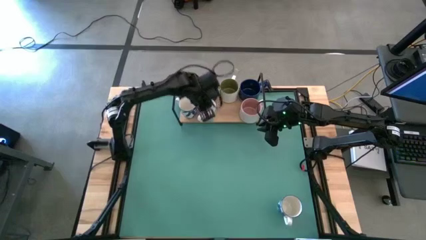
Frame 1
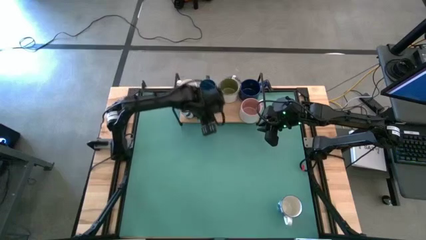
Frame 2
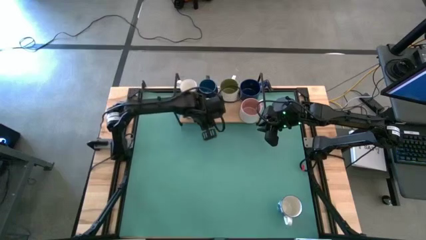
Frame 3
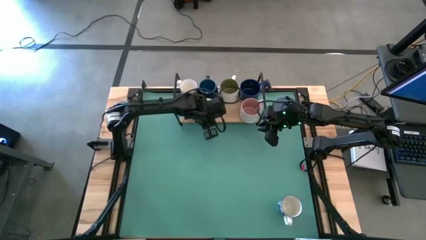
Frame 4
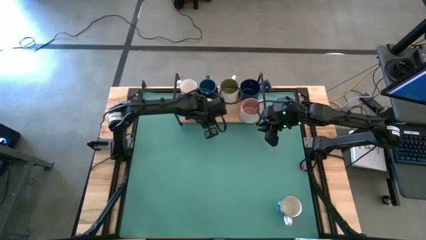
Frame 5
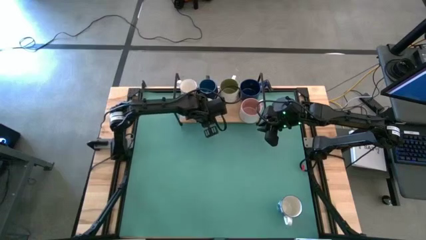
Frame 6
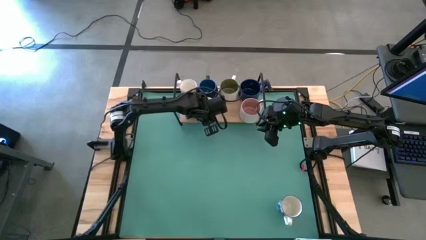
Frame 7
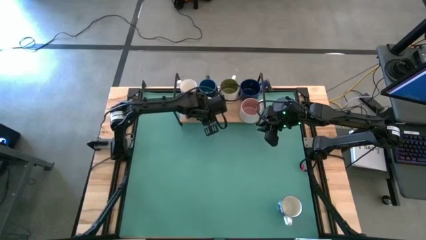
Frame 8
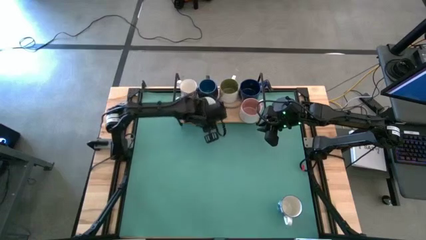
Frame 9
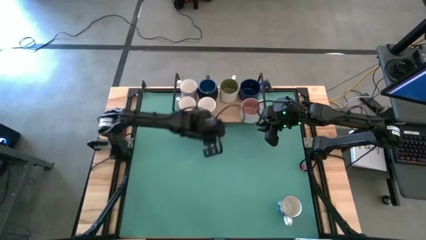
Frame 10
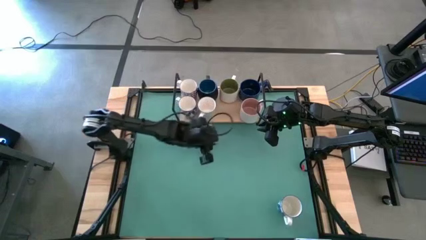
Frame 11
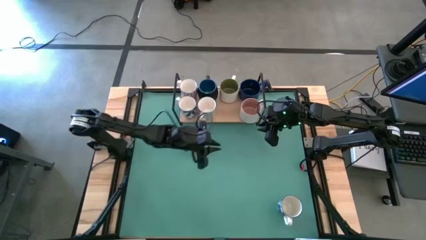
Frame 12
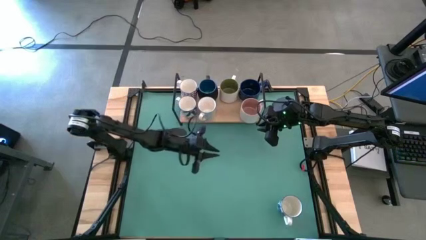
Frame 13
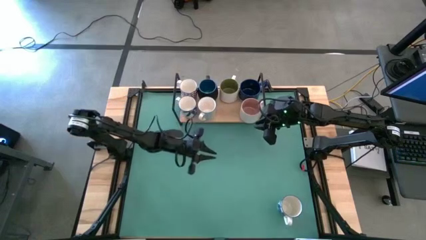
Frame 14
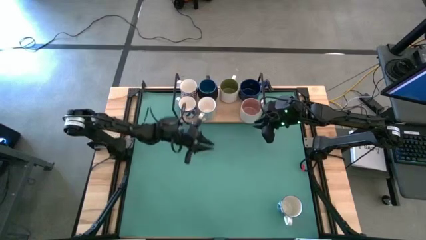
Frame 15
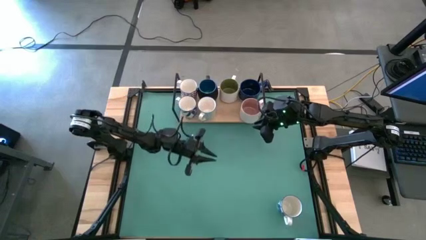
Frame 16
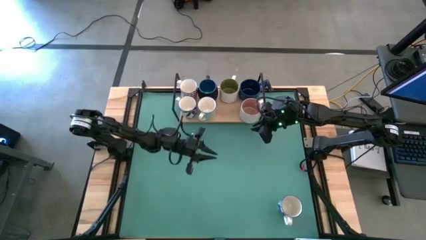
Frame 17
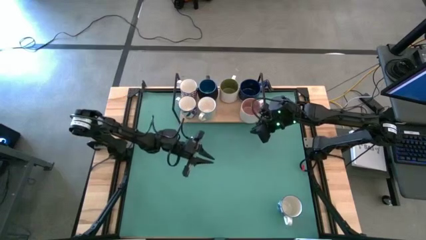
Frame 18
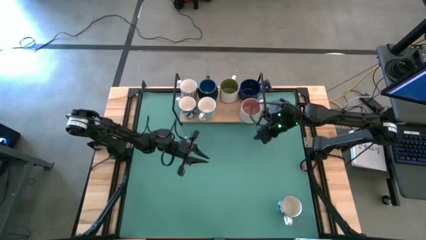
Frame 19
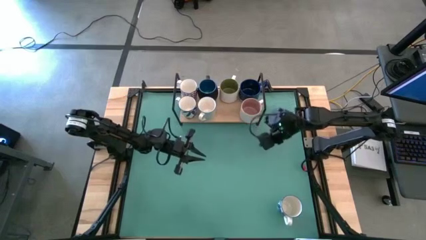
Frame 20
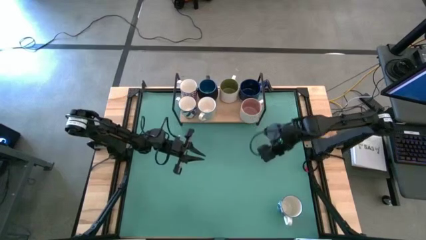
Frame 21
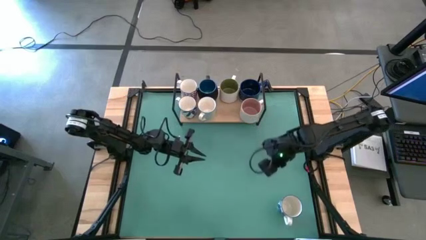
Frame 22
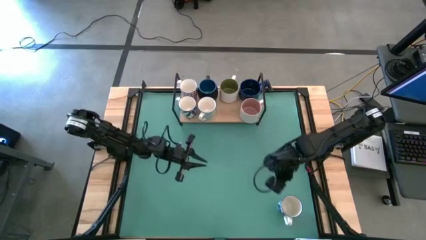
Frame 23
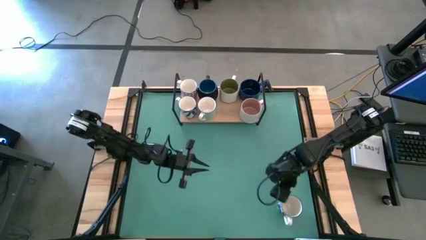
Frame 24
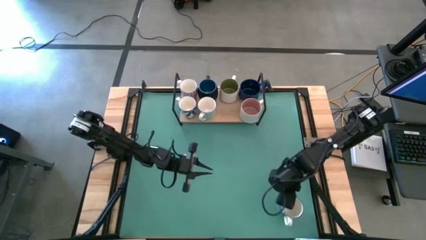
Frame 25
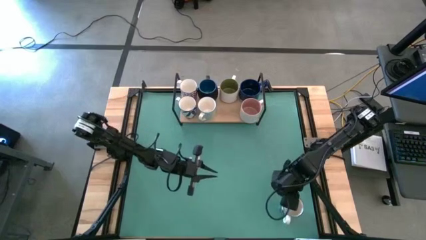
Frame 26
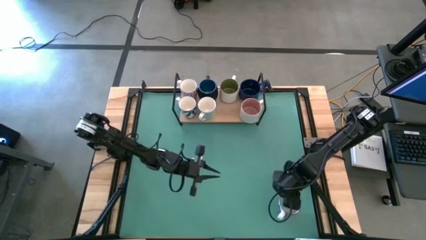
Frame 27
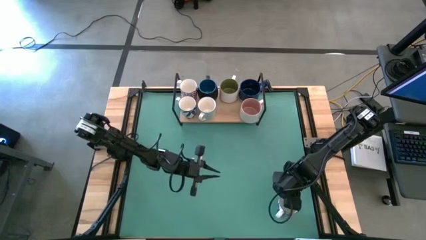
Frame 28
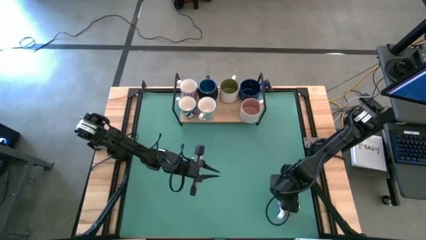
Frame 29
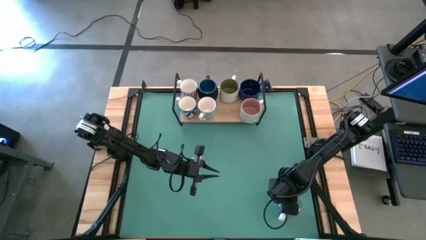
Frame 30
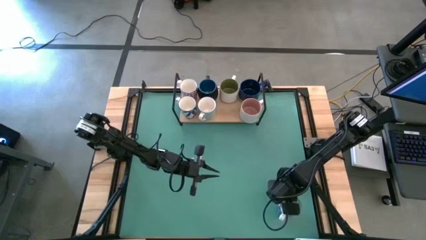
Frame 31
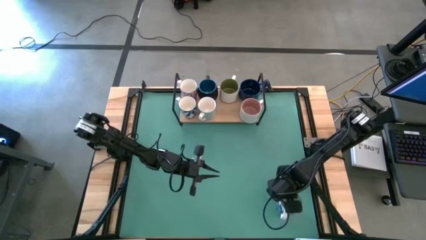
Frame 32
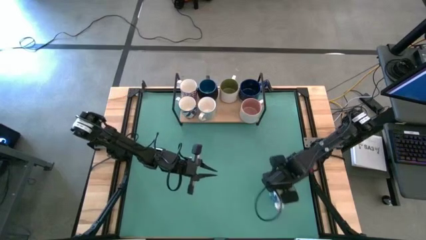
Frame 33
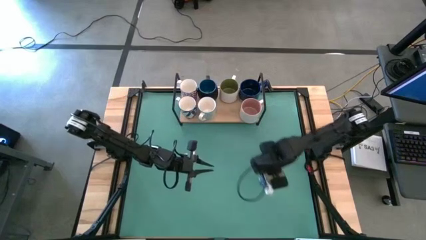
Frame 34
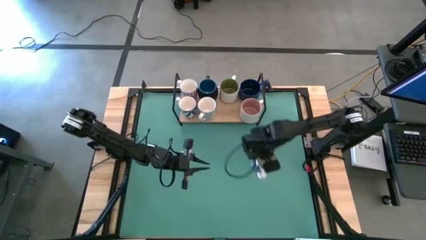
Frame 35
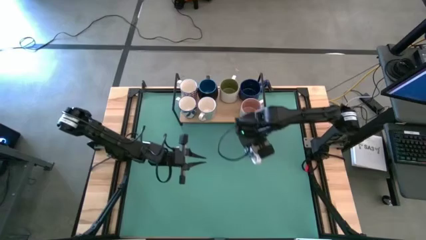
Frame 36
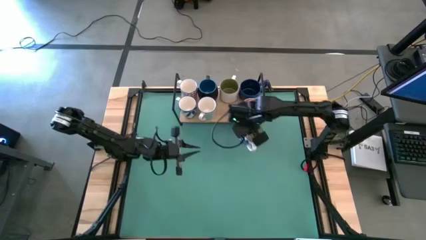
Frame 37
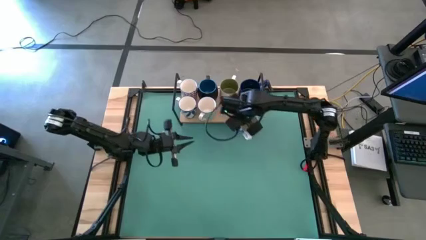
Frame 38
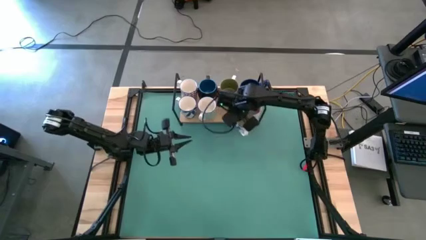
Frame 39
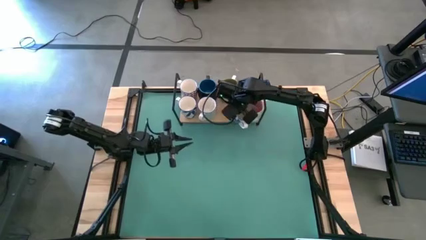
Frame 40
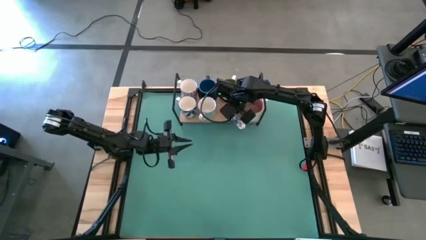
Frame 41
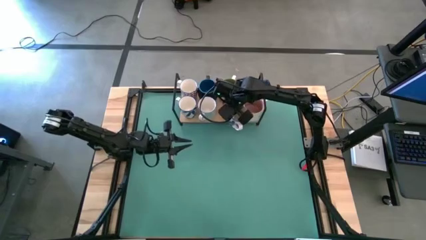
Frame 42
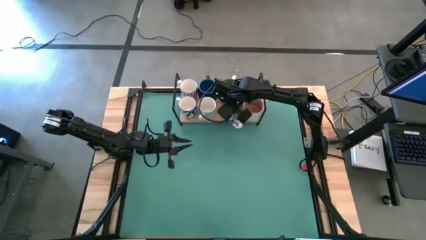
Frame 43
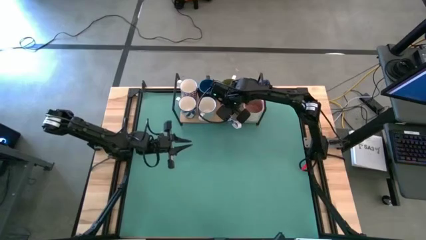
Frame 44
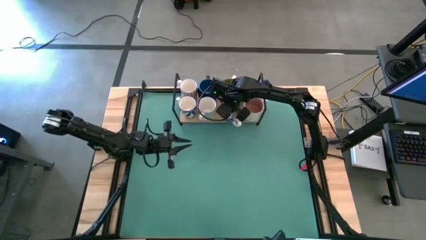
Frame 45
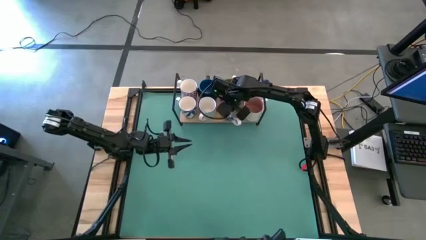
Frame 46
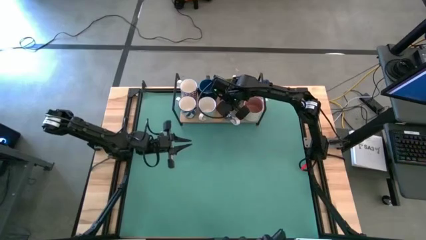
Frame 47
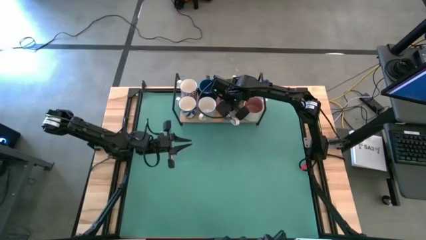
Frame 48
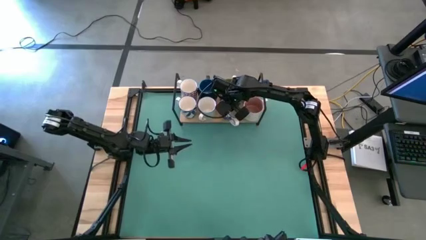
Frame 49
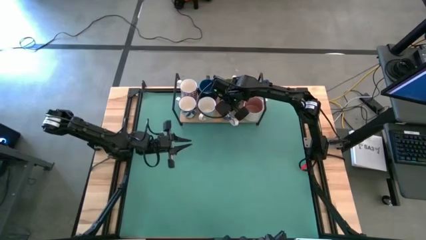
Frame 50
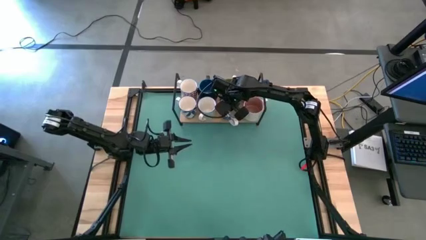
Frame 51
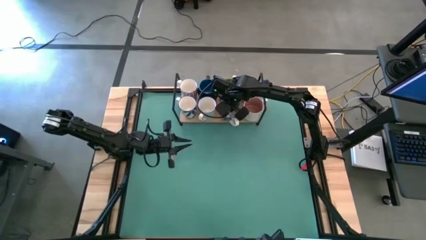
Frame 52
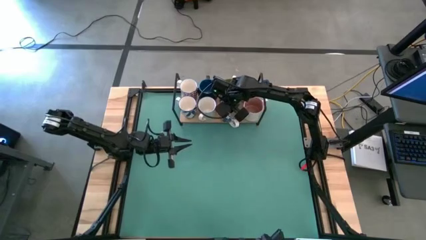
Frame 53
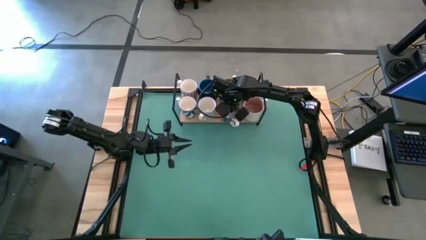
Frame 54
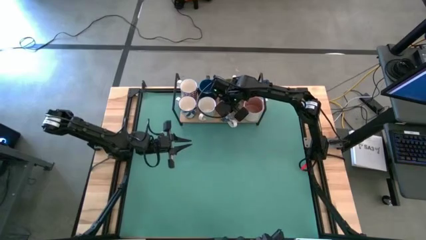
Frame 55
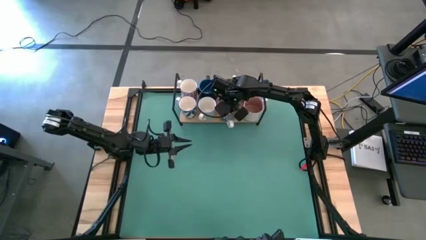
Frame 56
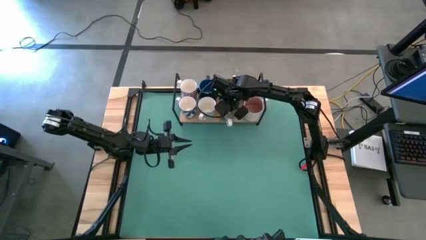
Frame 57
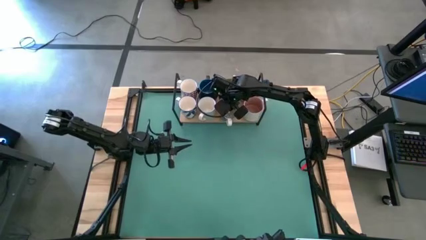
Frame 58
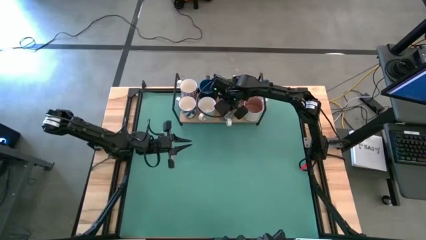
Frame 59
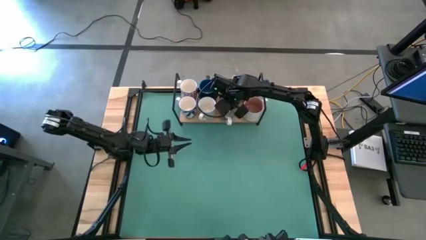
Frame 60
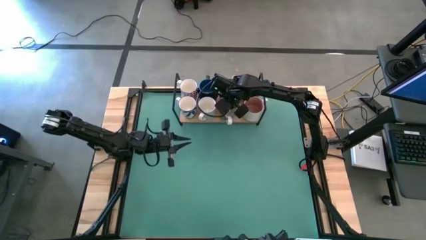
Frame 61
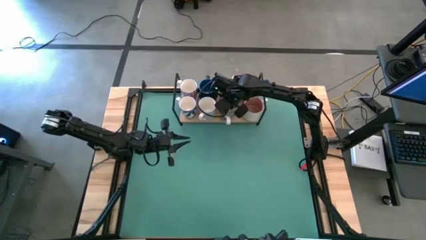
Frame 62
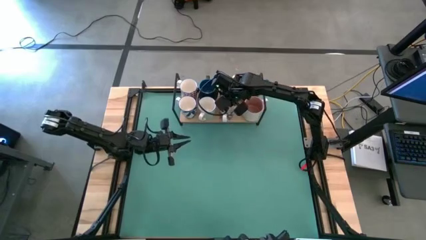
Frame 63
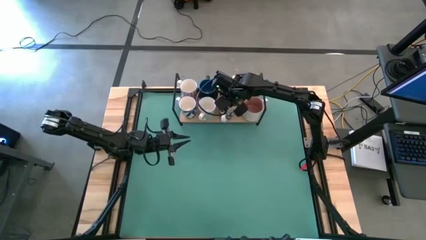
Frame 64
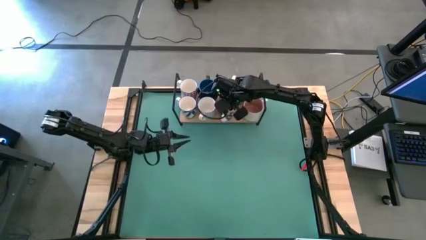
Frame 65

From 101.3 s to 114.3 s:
Task: Place coffee mugs
Put the blue pattern mug on the shelf

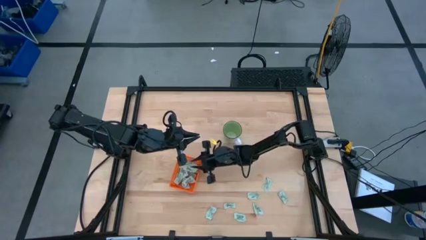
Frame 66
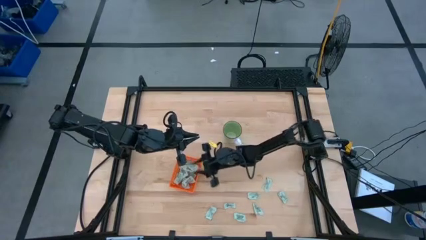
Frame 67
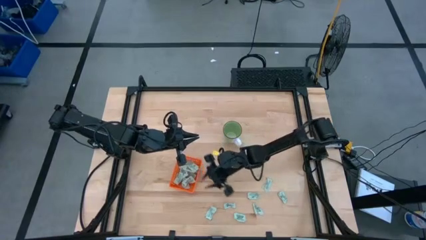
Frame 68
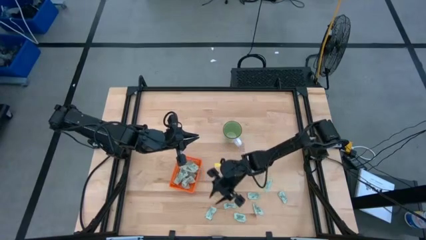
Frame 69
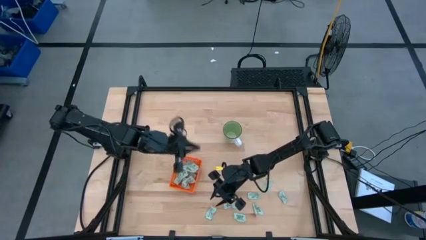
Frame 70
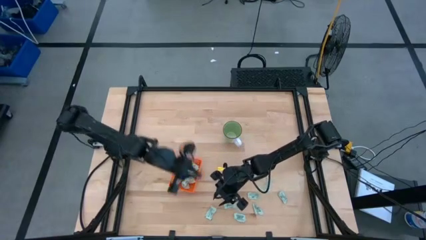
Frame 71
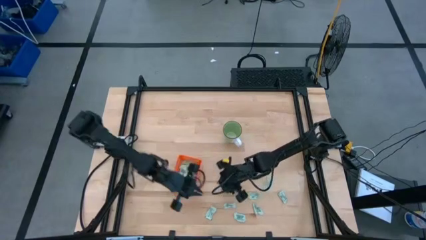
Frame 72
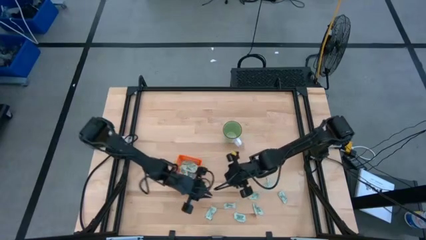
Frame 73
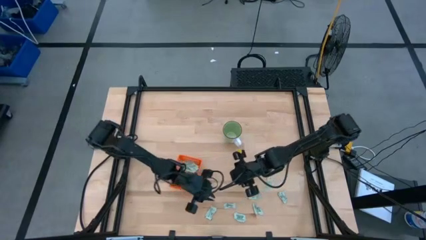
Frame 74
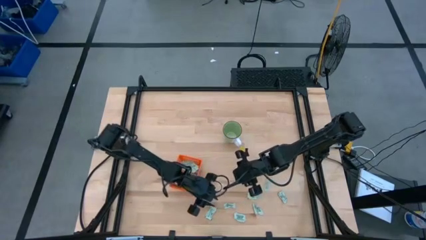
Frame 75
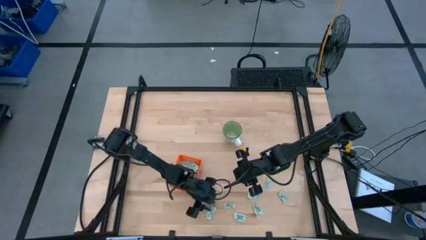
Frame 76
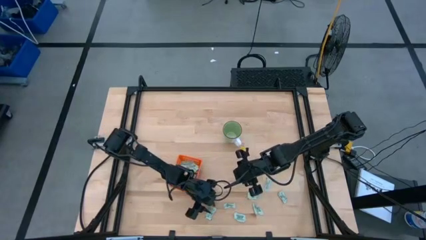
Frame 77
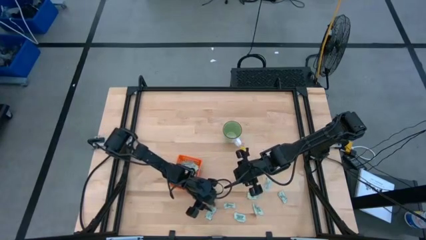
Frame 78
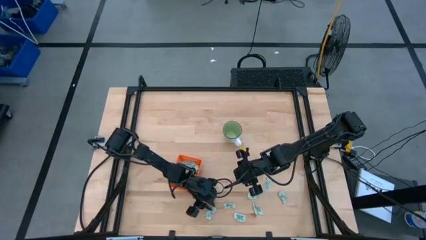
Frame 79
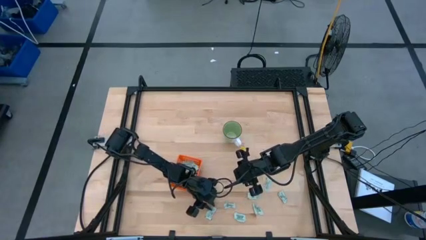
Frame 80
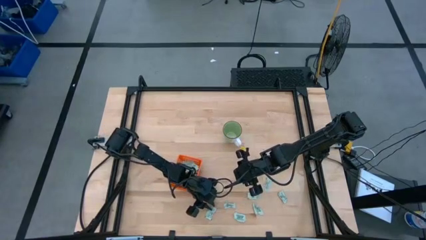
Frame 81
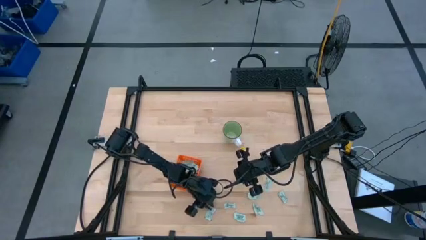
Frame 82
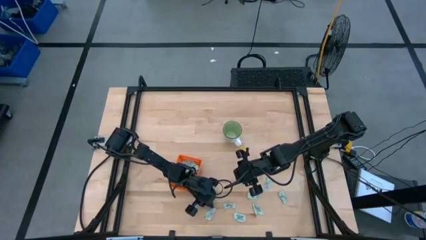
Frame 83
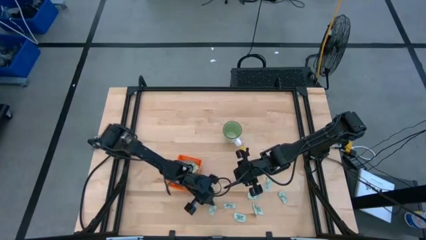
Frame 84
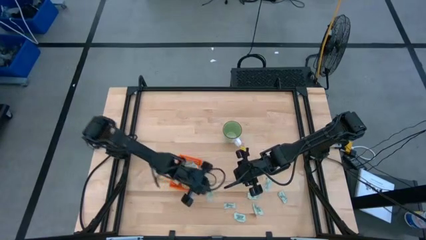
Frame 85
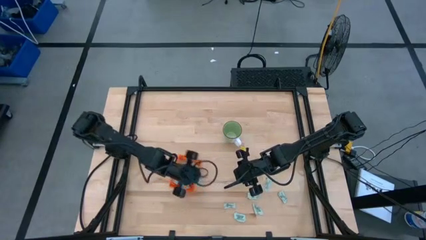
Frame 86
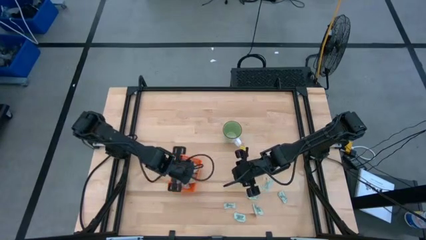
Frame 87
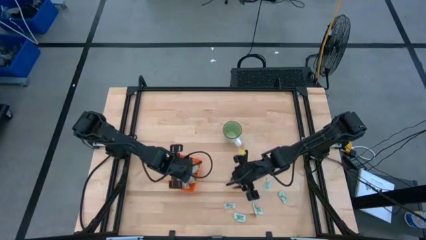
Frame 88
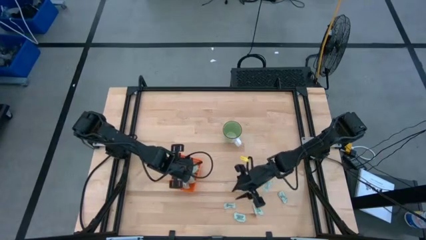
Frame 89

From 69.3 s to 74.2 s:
Task: Pick and place Stevia / Truvia into bins
Put the light green stevia packet into the orange basket
